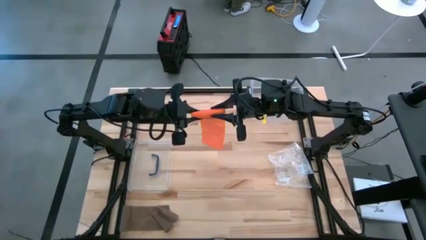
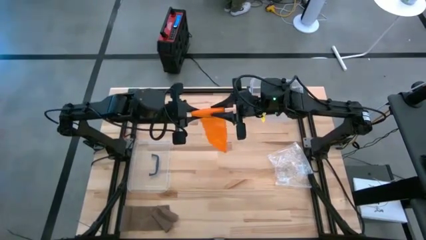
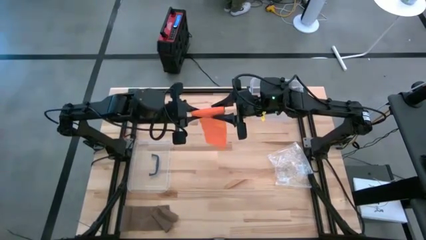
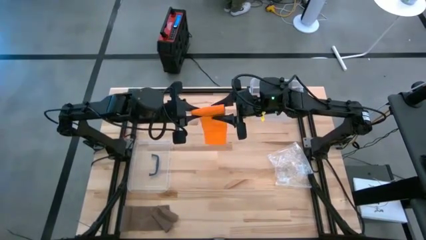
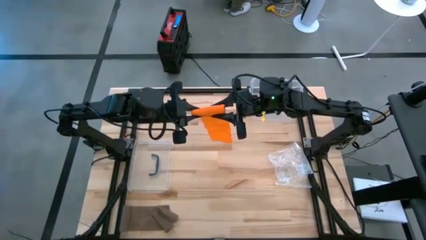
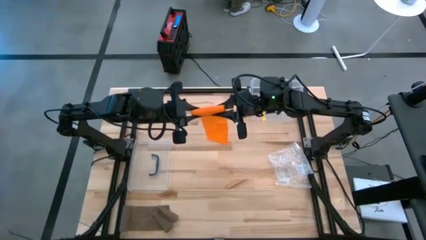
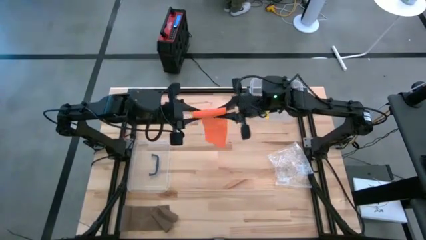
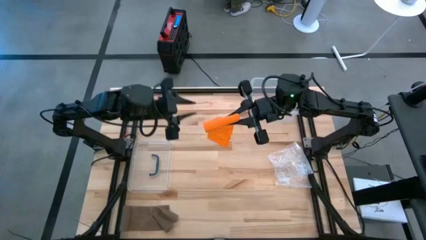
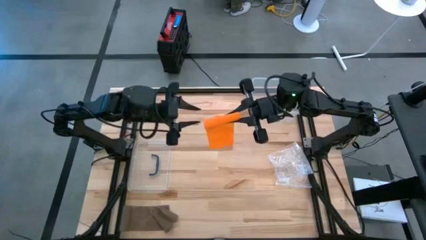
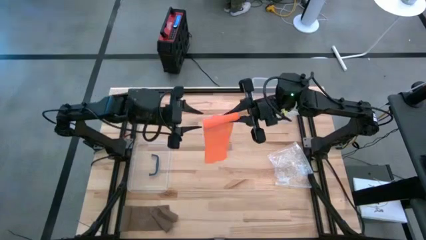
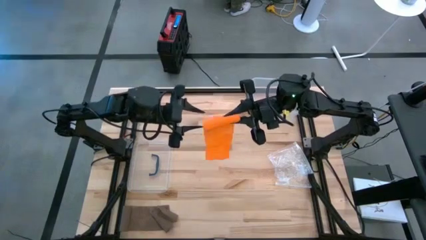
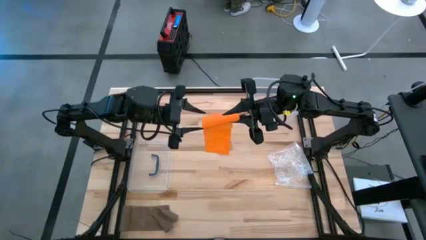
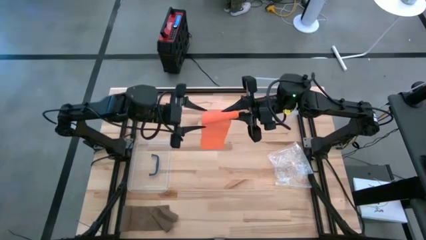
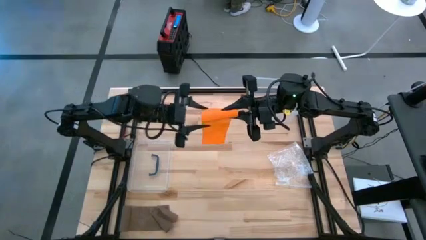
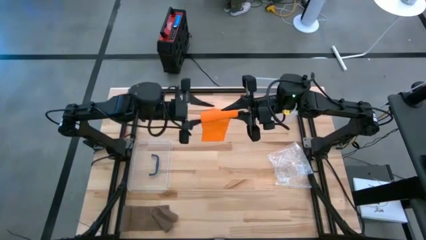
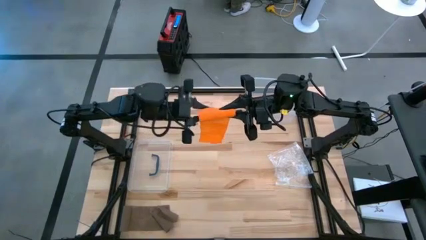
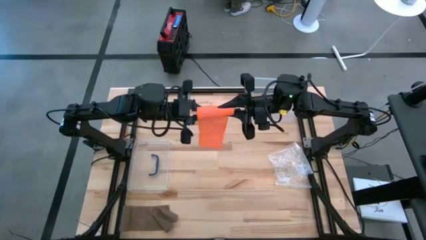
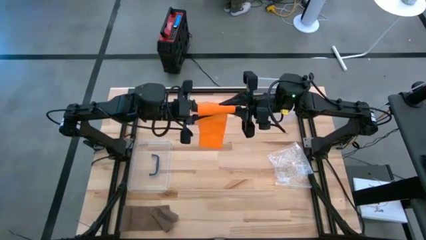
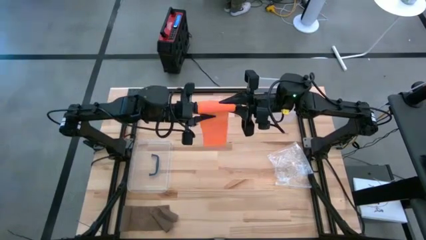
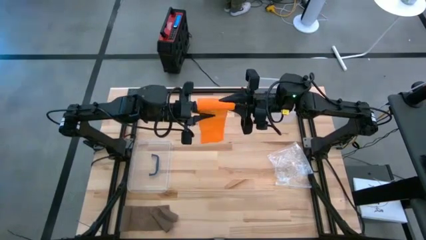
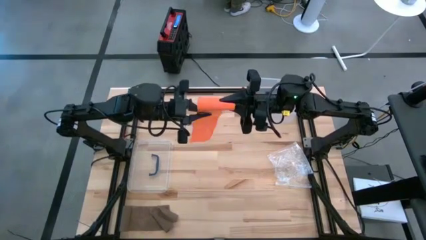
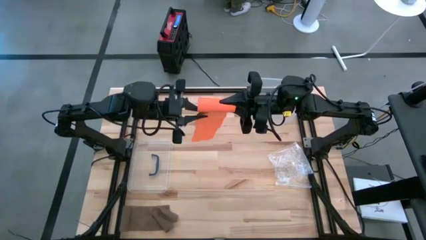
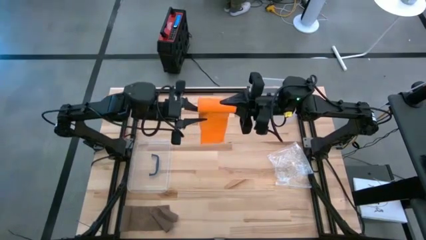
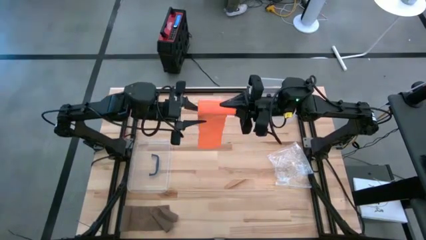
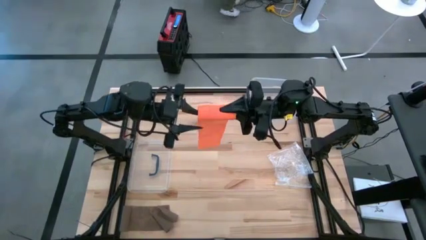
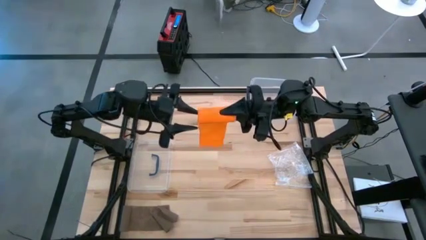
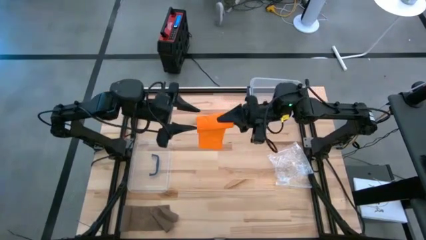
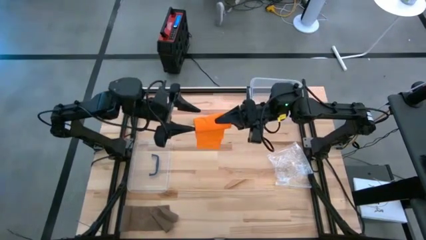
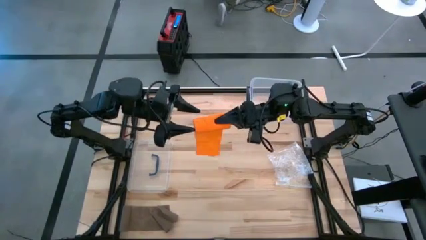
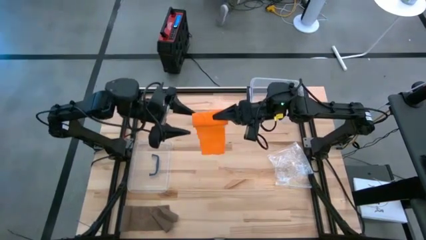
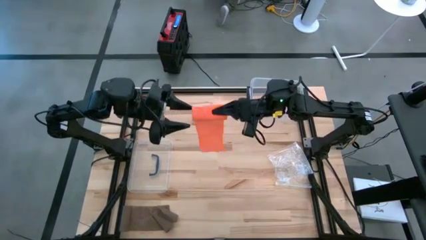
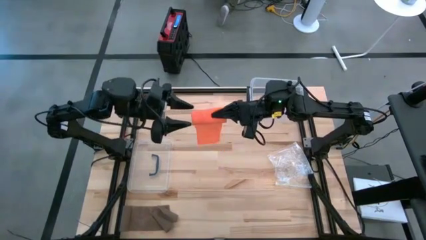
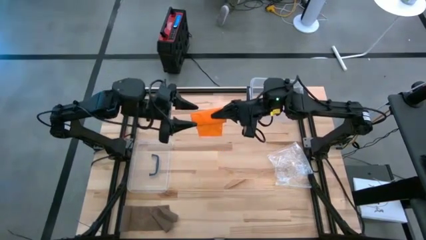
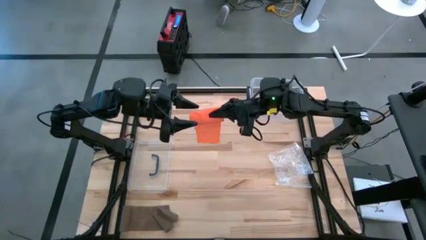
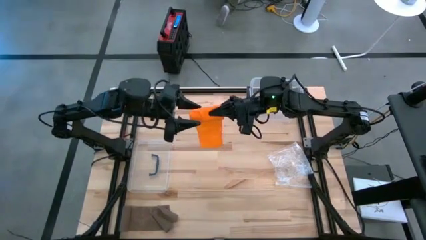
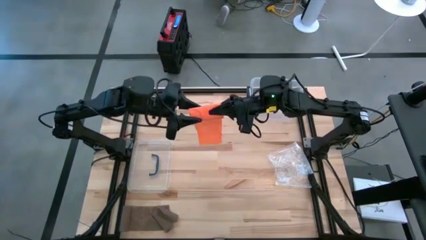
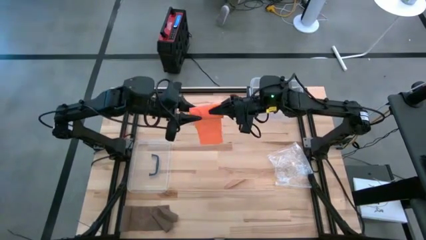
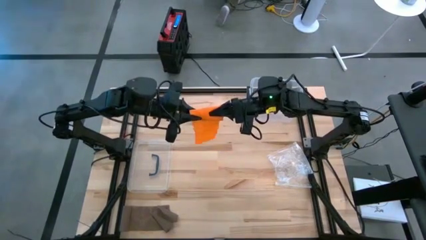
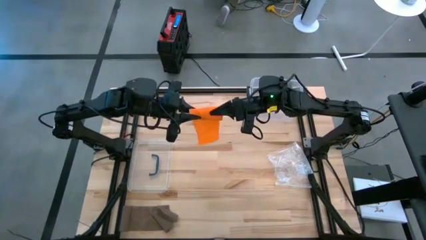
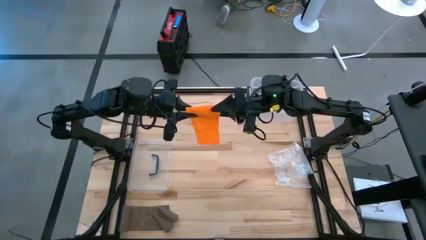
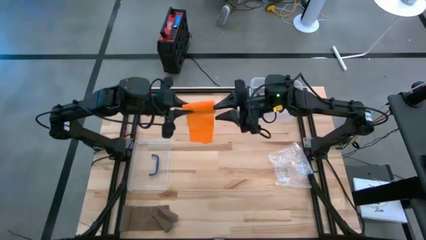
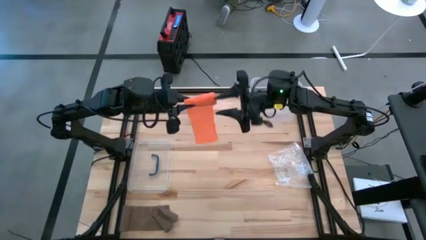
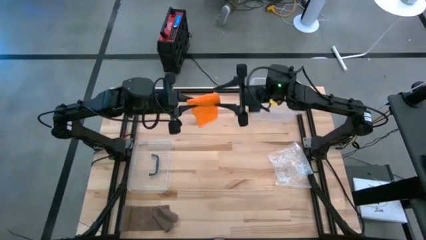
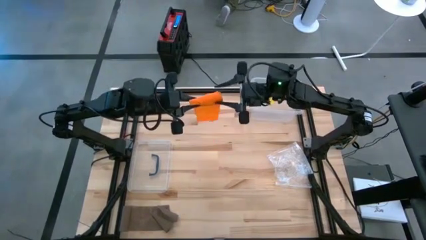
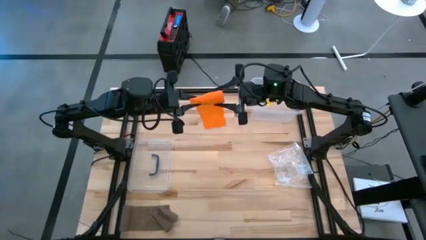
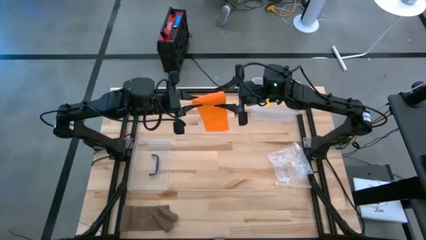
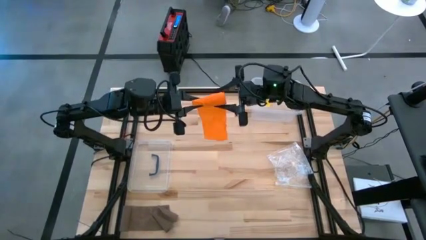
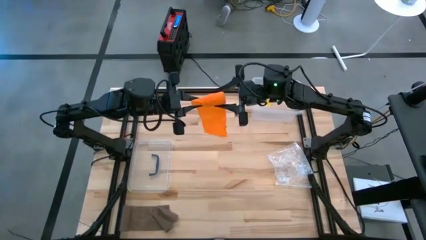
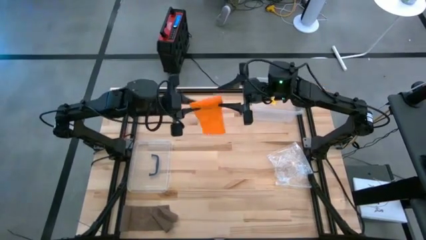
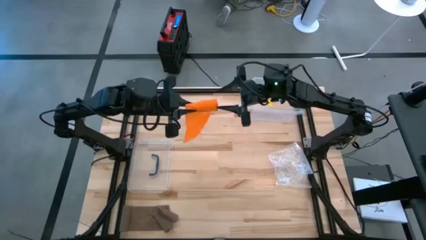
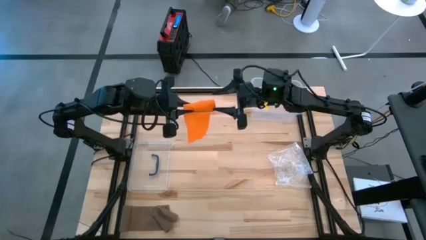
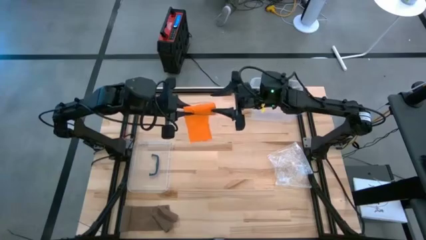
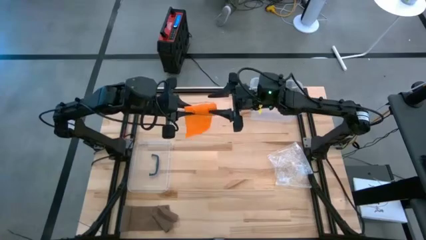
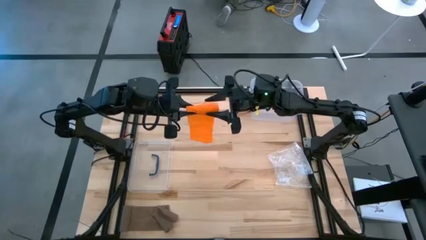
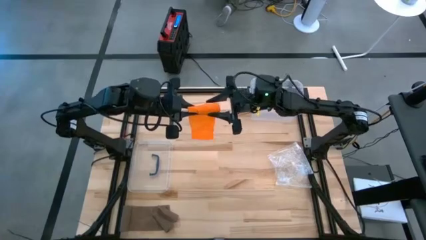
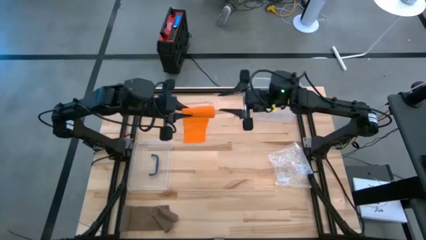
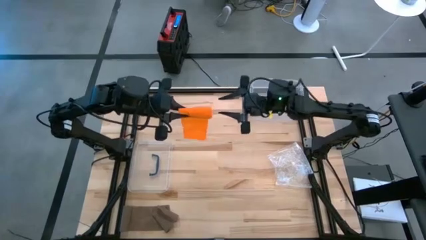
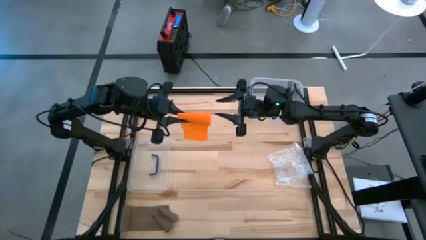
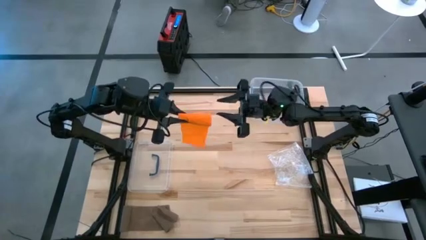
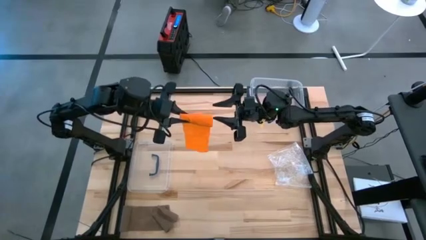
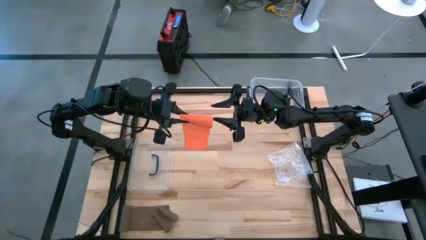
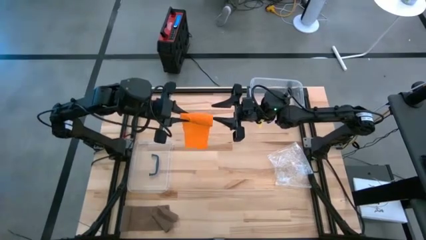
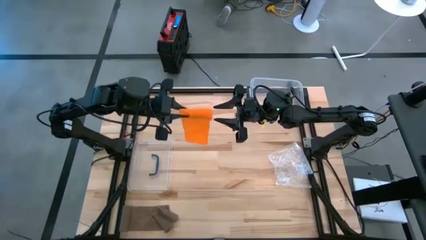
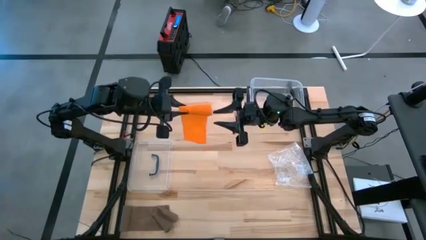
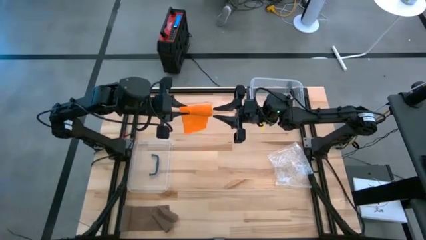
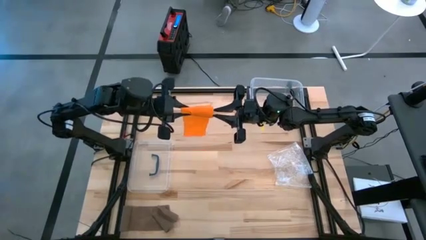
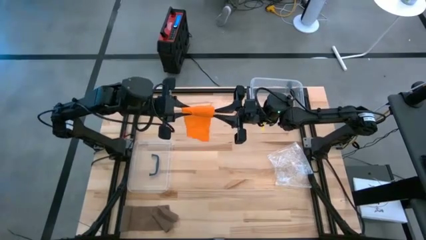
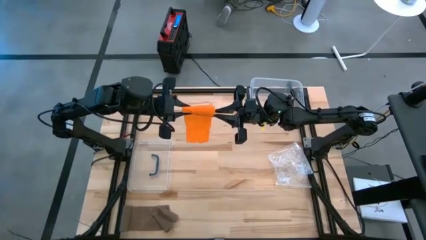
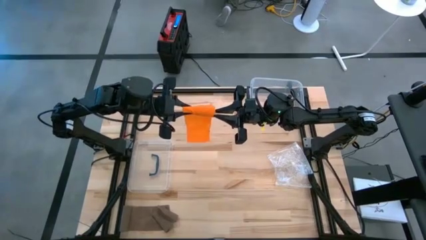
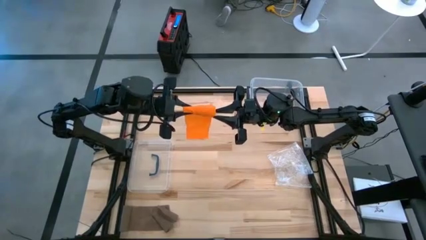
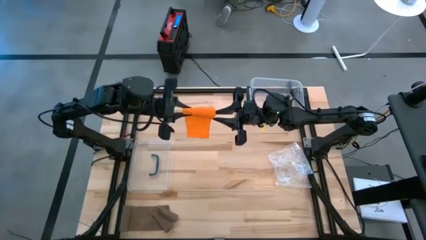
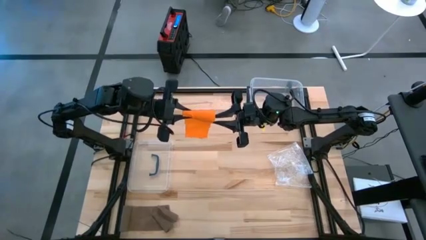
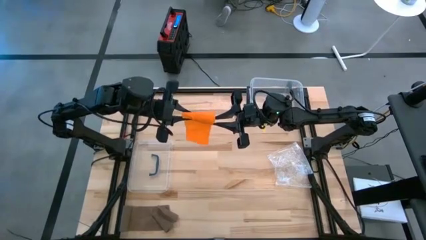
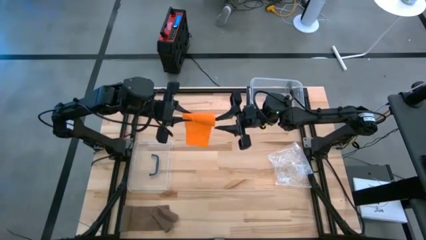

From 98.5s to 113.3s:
Task: Roll bandage
Roll the orange bandage

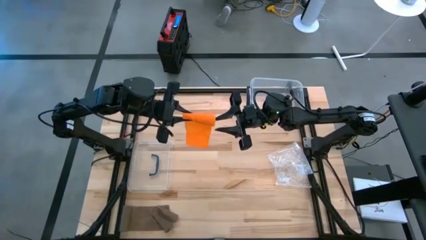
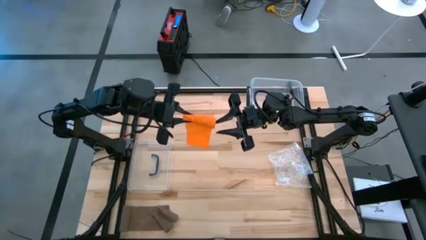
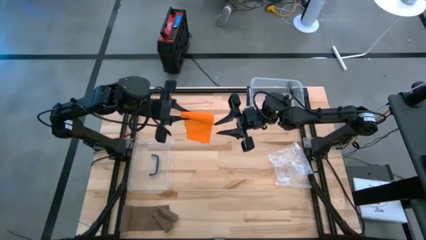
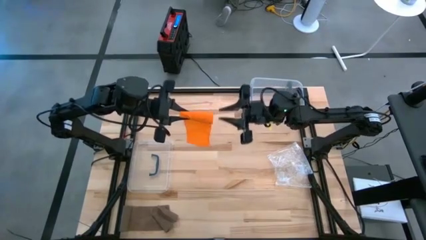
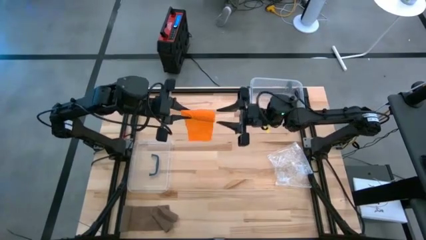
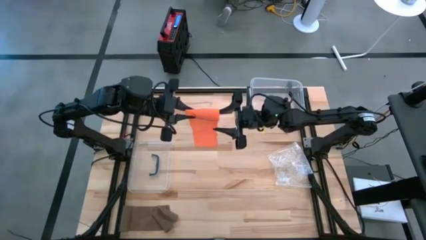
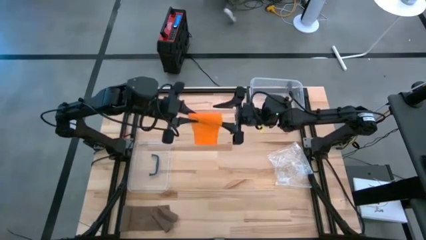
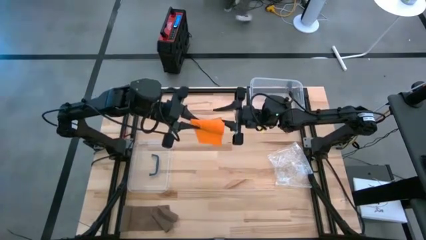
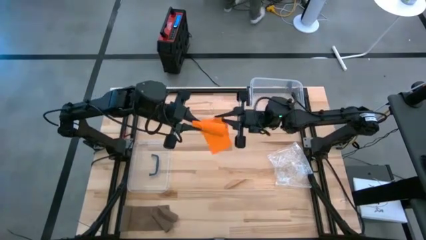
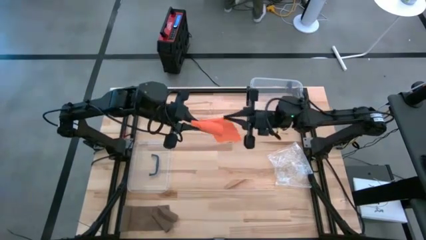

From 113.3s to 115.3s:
Roll the orange bandage
